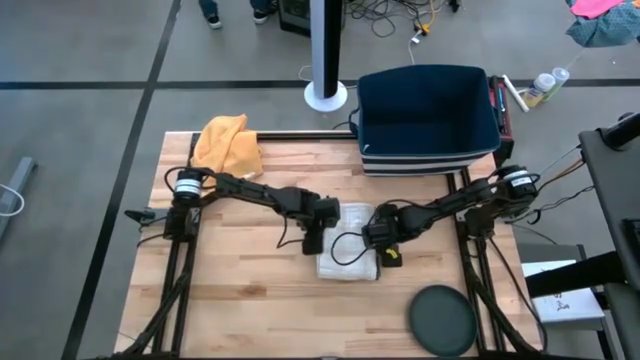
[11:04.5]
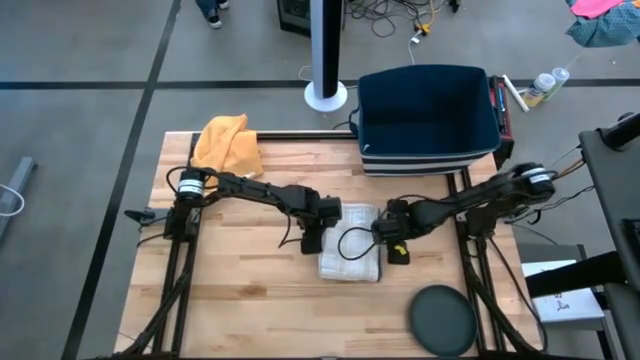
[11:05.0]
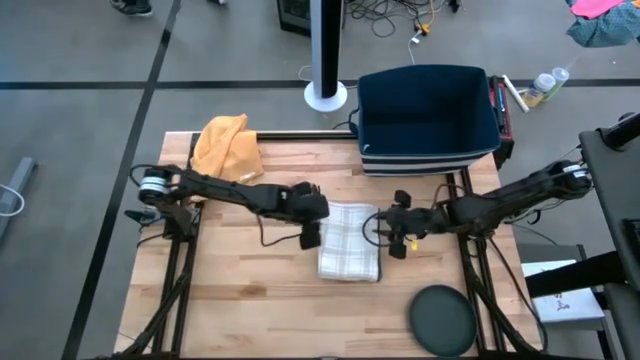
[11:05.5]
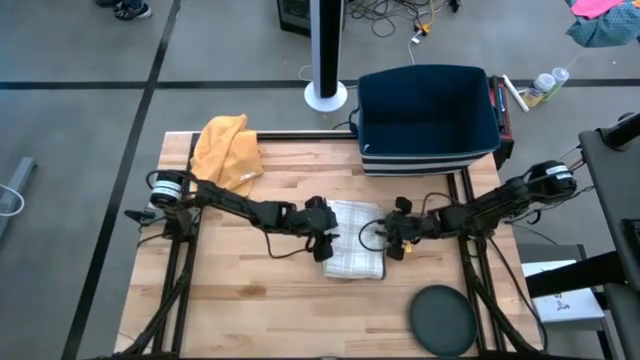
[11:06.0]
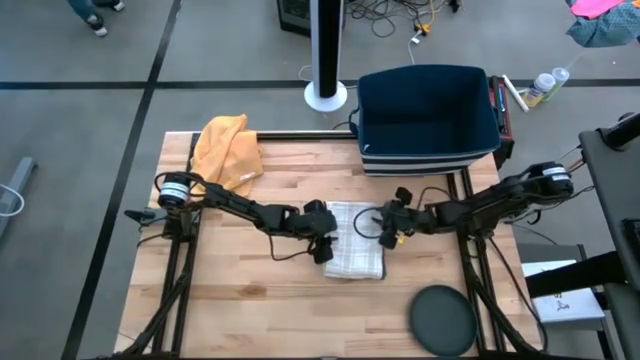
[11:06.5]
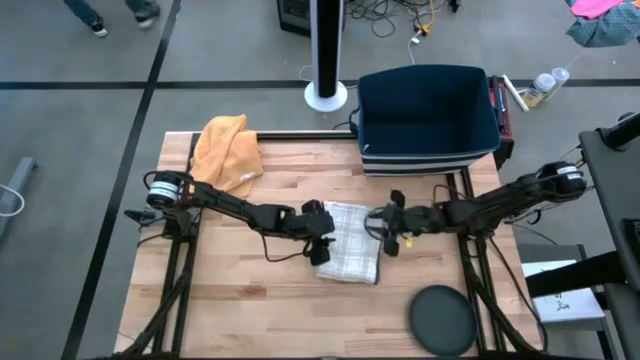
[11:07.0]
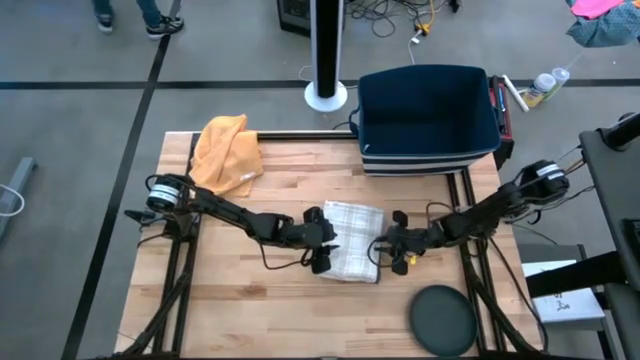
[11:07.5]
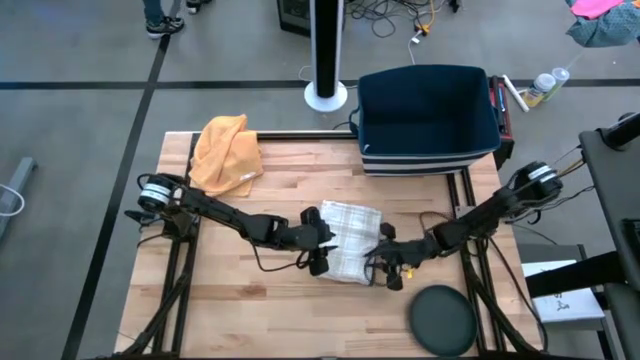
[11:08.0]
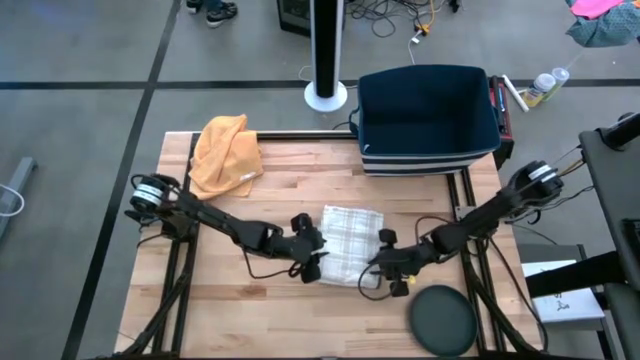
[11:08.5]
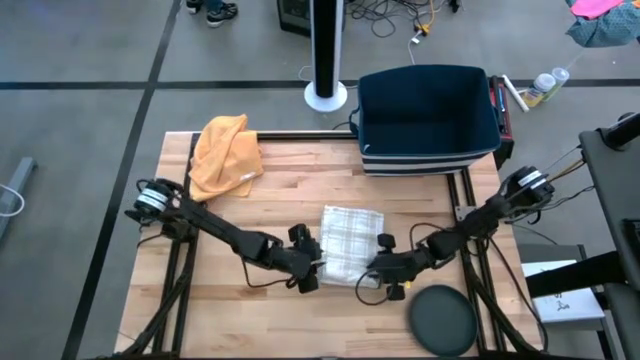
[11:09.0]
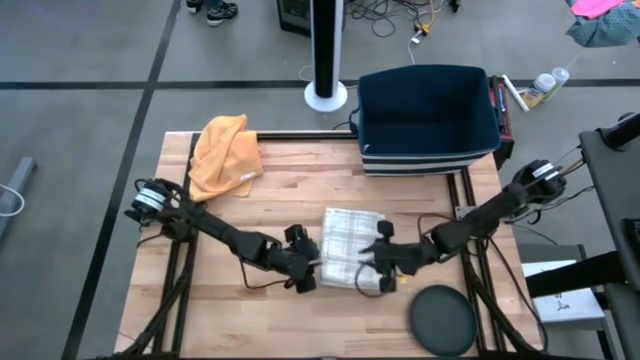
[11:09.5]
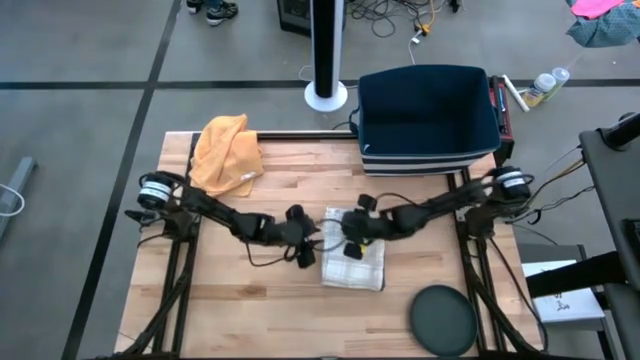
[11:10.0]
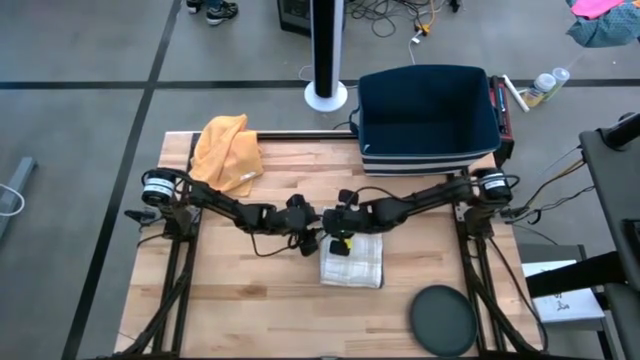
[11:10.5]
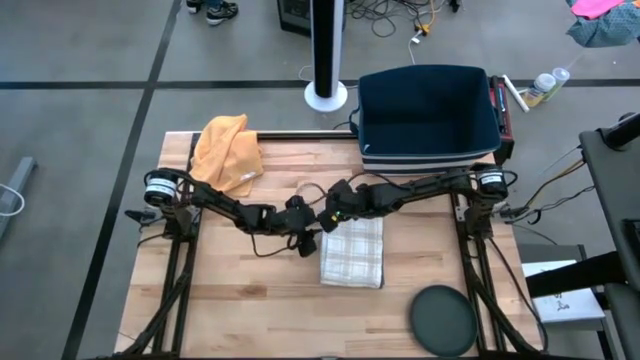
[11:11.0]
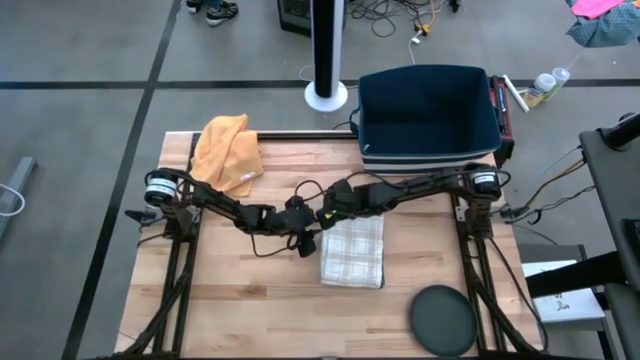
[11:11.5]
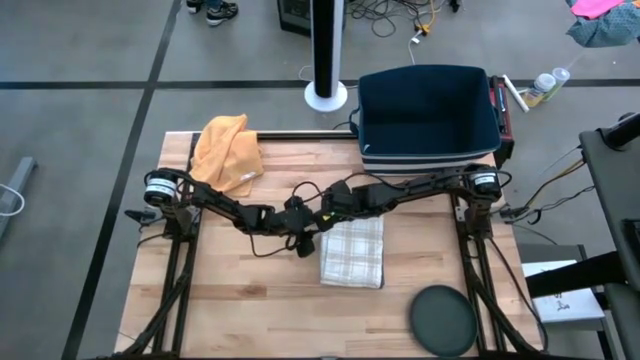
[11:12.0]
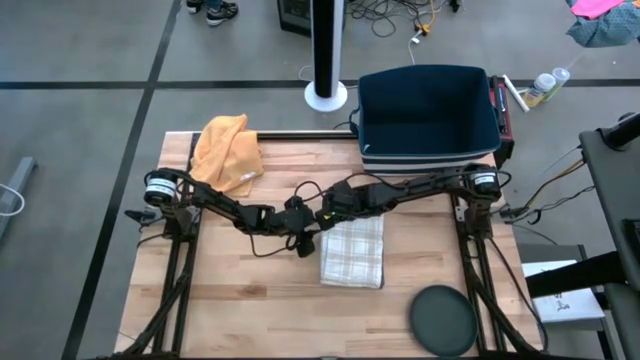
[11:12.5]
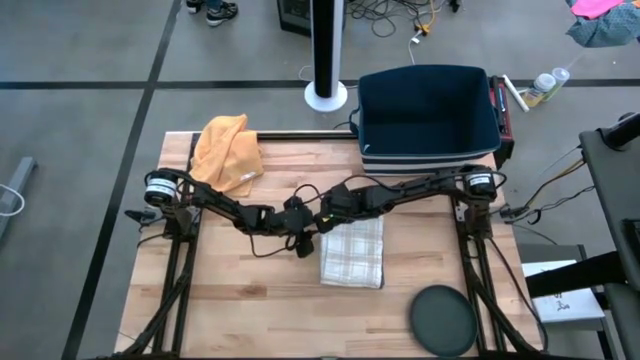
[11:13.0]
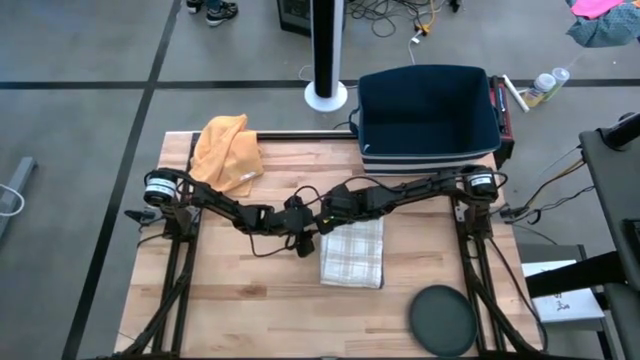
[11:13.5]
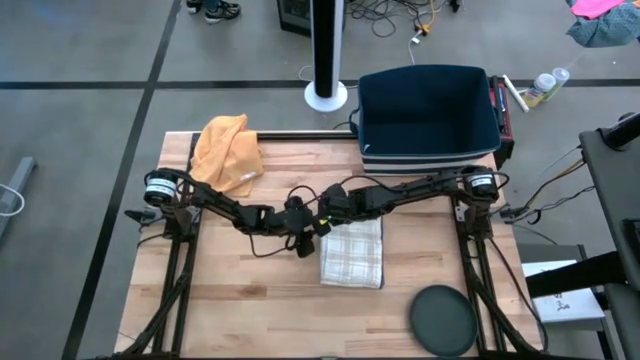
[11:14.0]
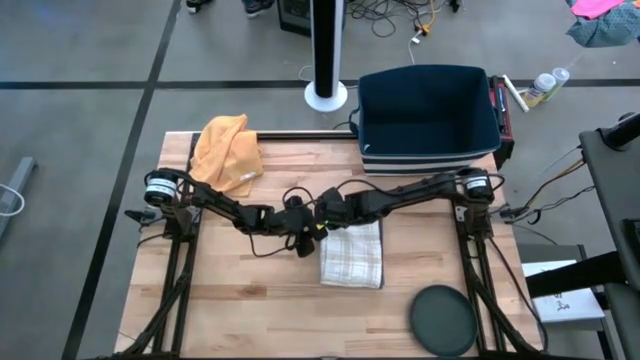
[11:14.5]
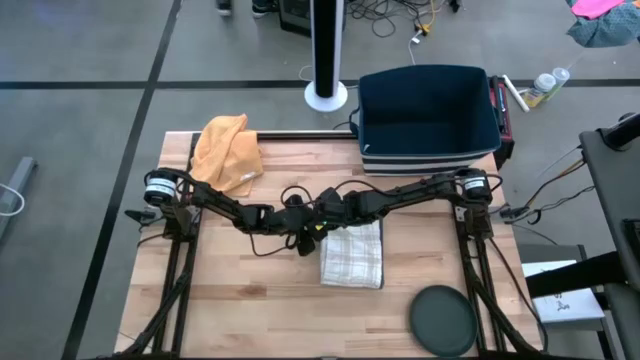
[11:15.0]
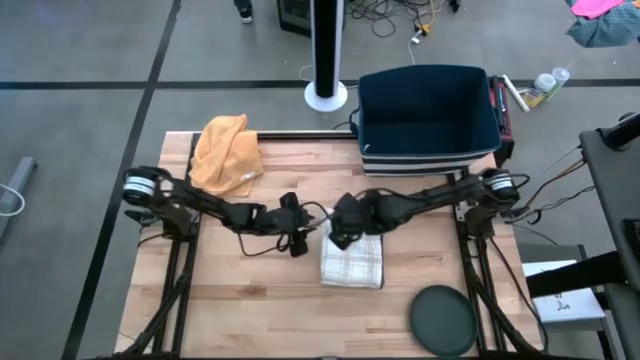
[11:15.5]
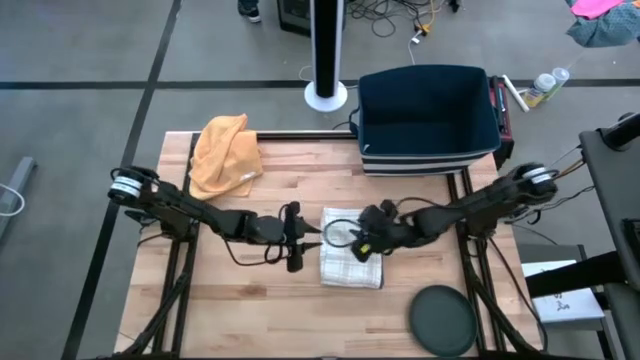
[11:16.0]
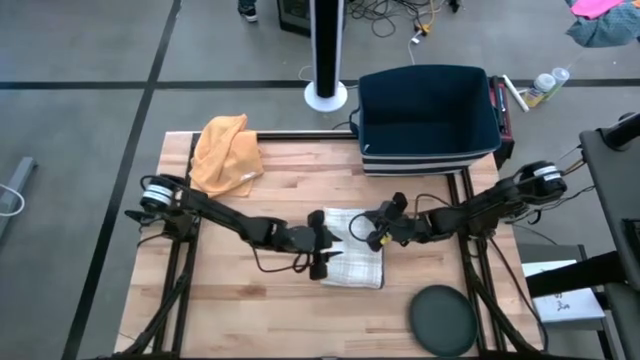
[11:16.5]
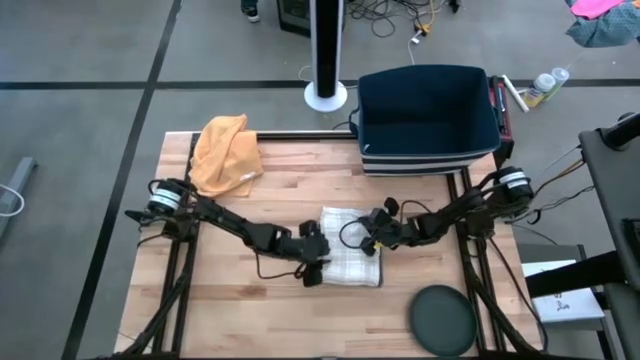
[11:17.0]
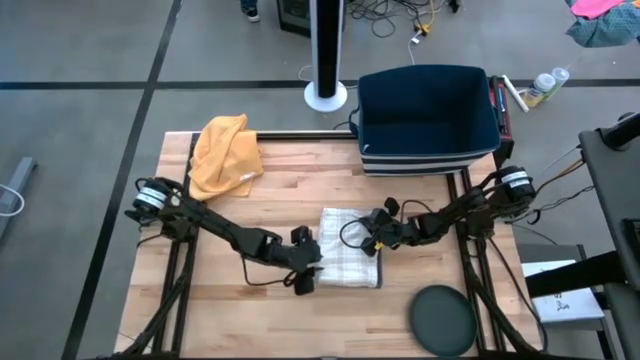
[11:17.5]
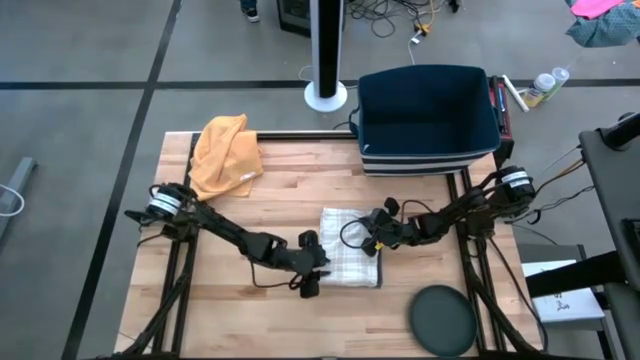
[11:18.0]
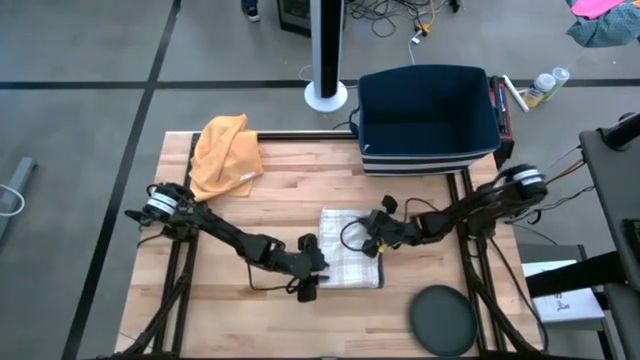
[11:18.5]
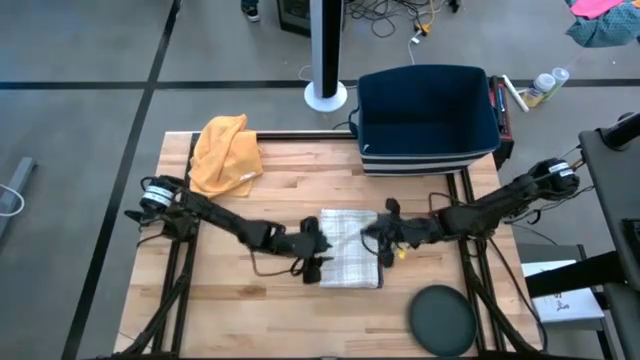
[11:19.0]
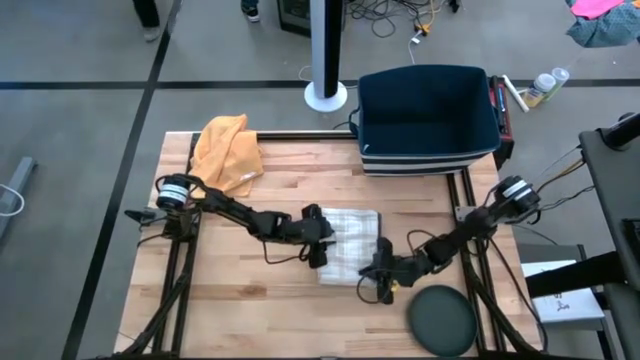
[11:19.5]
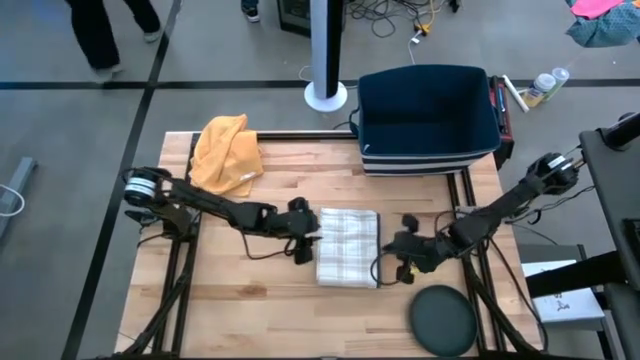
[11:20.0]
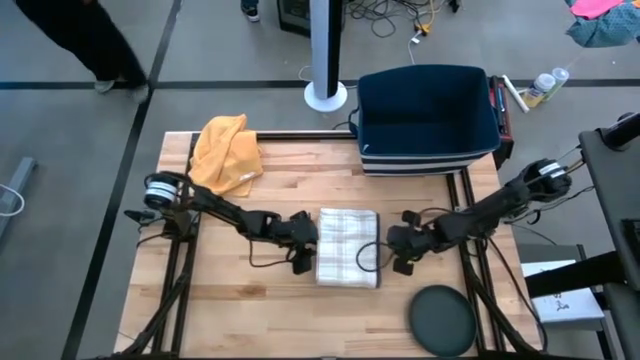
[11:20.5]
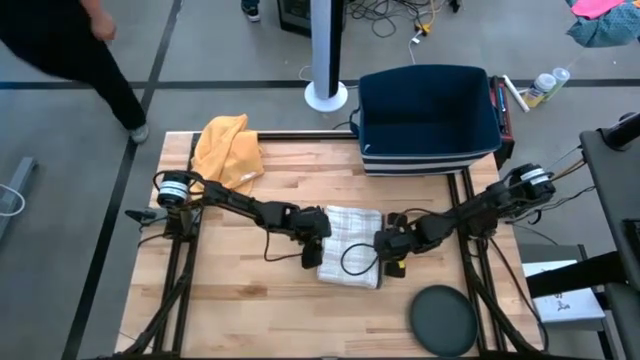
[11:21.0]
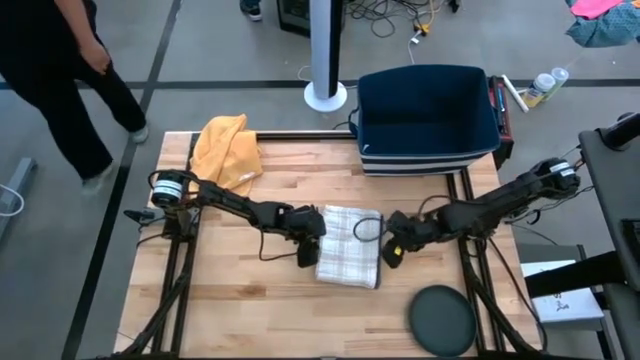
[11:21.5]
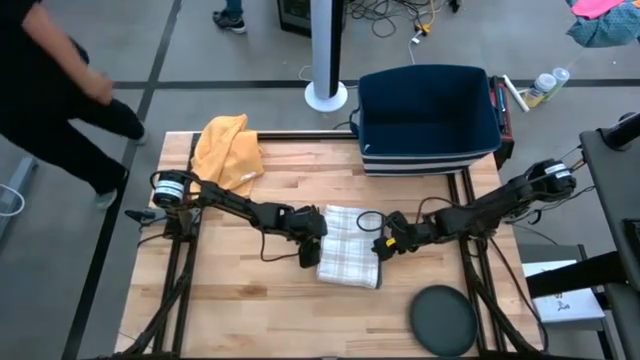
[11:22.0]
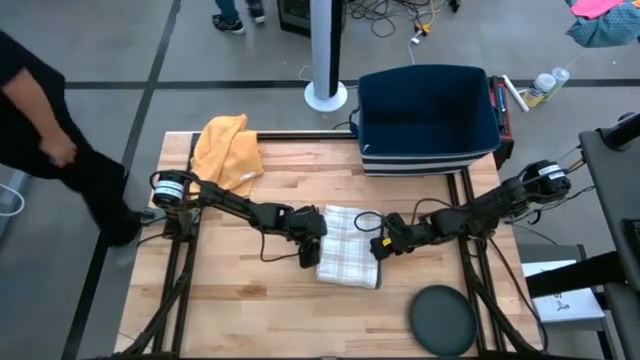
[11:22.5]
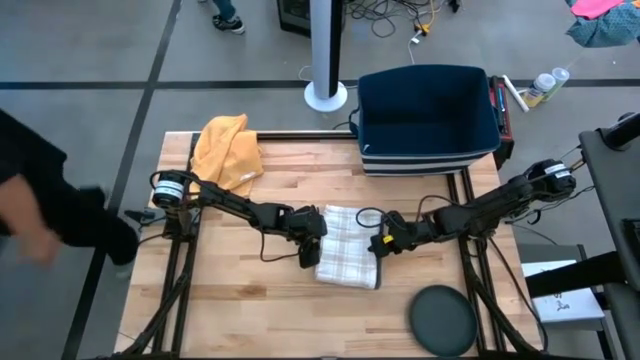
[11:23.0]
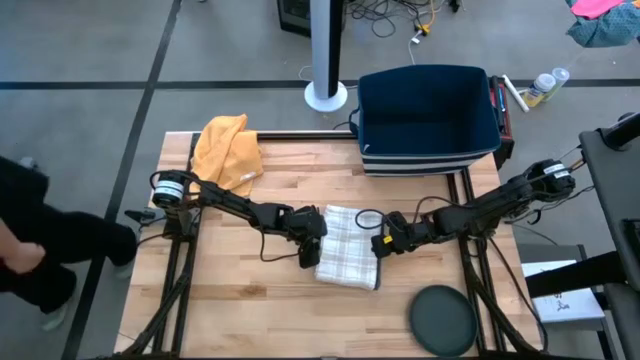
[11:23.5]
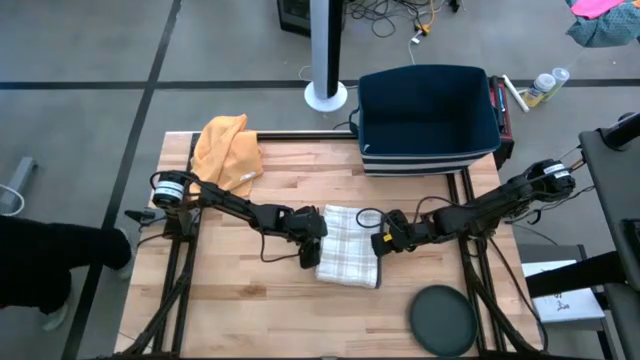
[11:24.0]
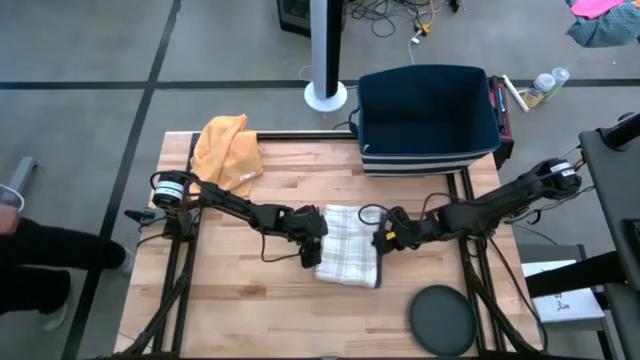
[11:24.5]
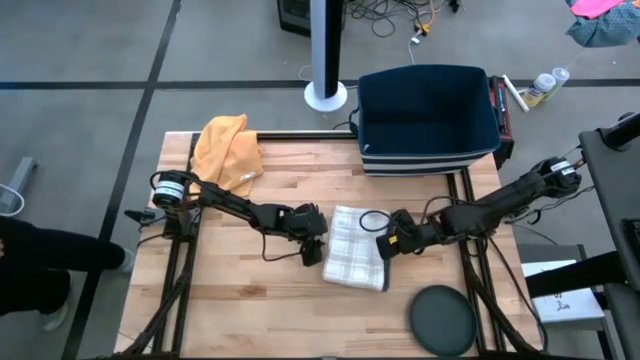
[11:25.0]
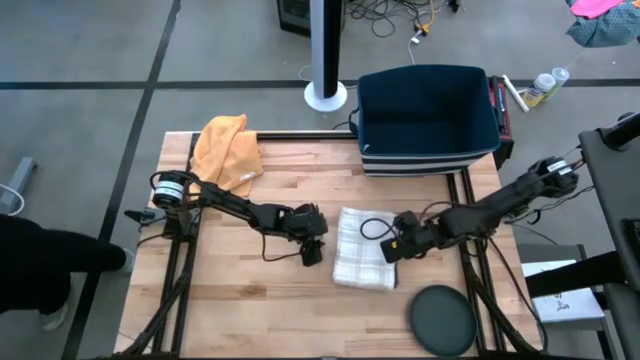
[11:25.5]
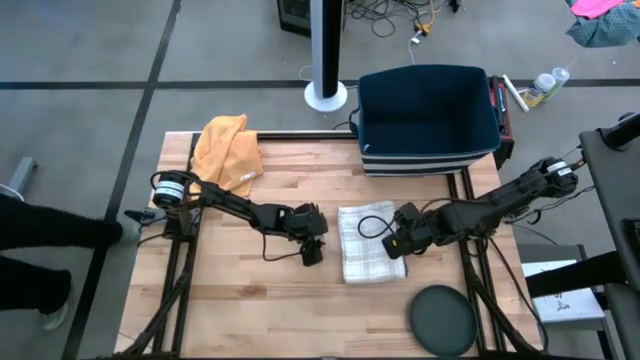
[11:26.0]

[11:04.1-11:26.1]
Task: Fold kitchen towel into neat rectangle
Stack the white patterned towel on top of the gray towel
